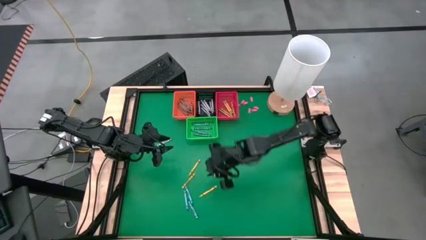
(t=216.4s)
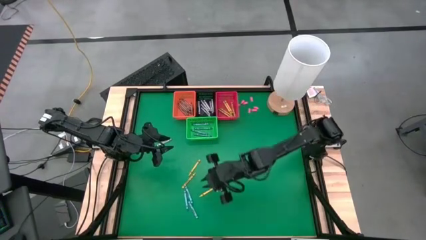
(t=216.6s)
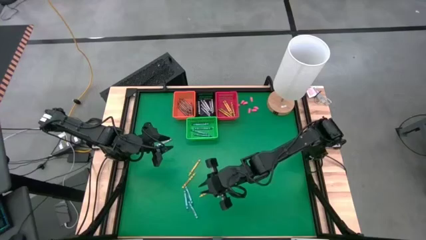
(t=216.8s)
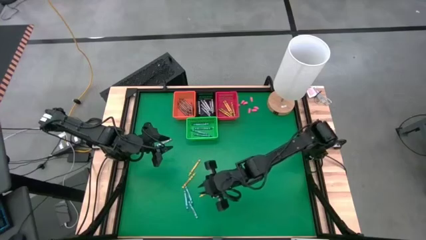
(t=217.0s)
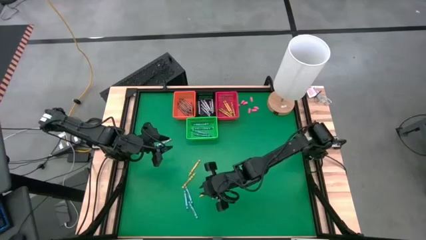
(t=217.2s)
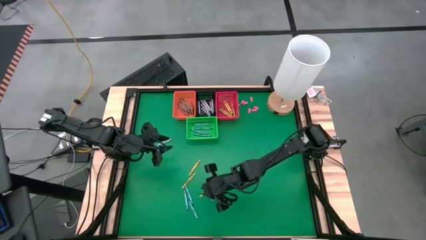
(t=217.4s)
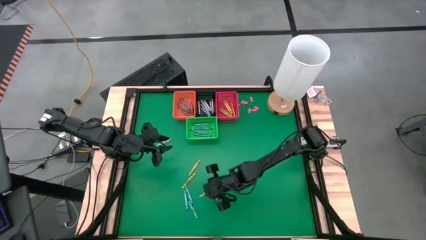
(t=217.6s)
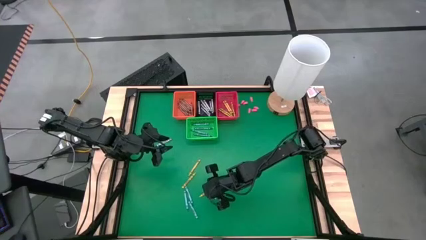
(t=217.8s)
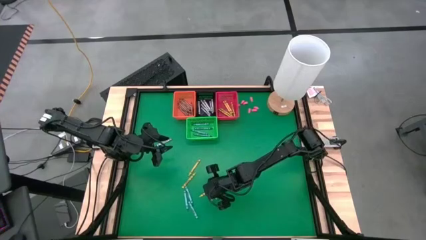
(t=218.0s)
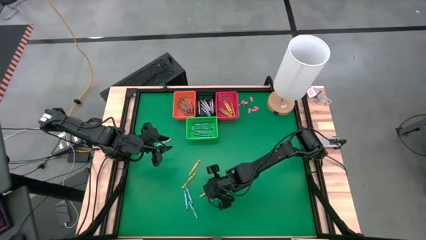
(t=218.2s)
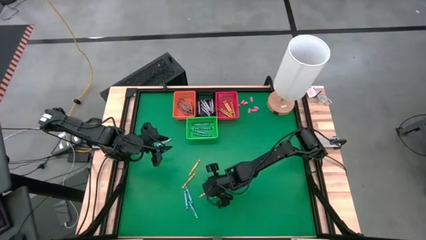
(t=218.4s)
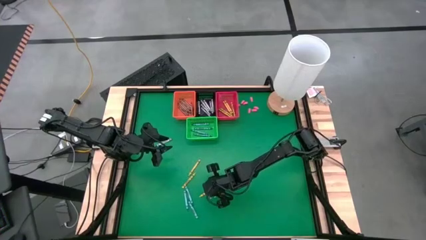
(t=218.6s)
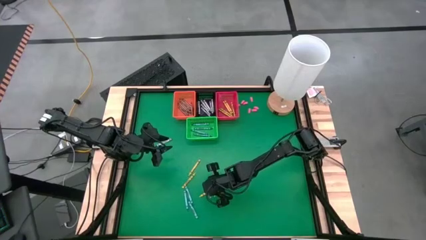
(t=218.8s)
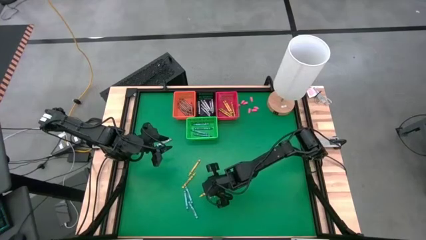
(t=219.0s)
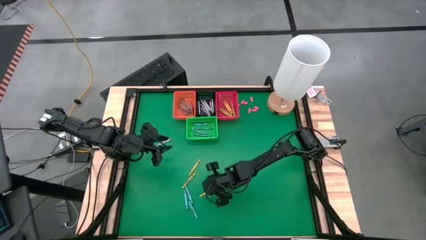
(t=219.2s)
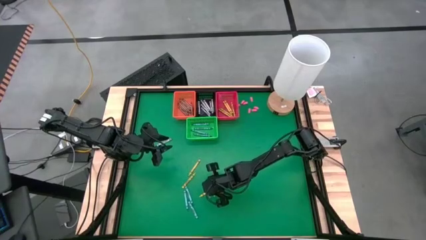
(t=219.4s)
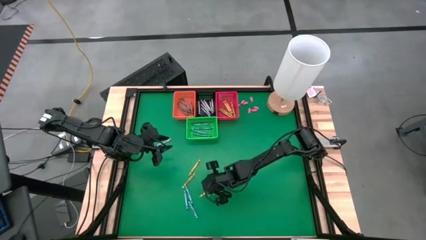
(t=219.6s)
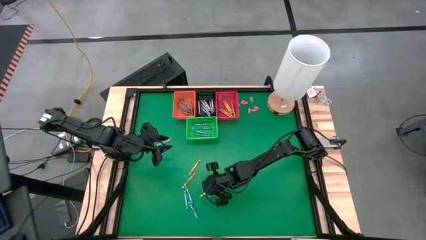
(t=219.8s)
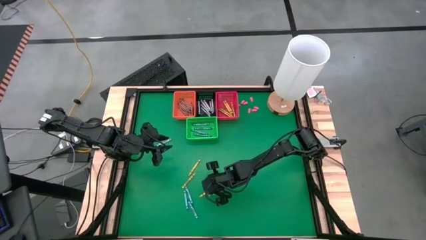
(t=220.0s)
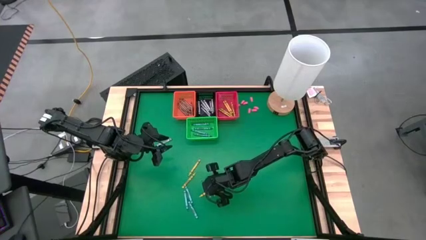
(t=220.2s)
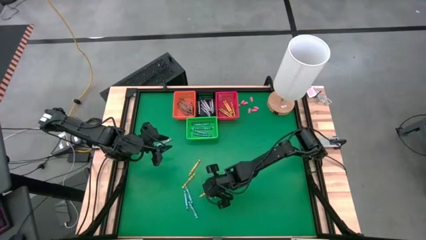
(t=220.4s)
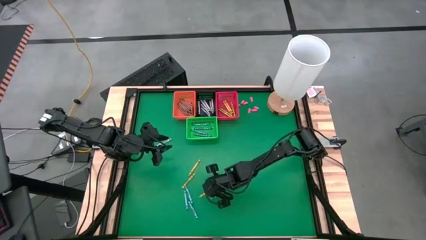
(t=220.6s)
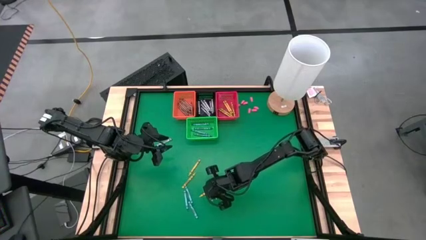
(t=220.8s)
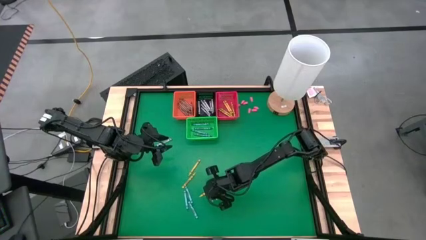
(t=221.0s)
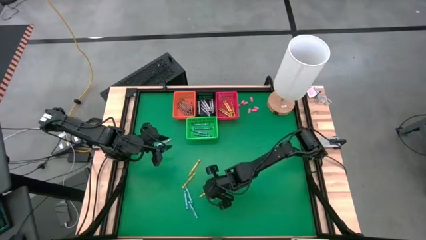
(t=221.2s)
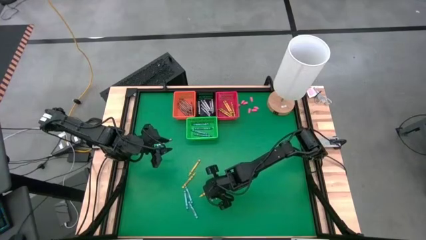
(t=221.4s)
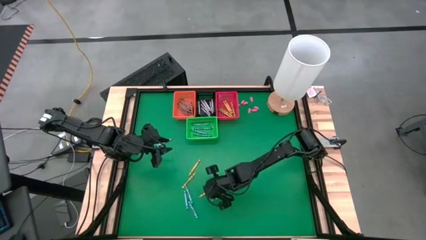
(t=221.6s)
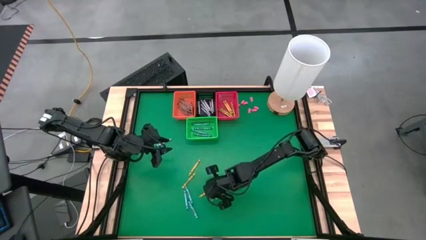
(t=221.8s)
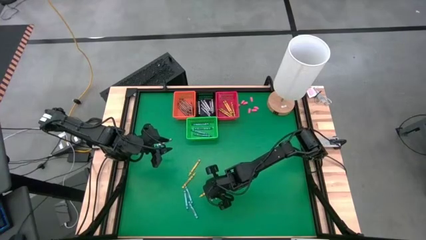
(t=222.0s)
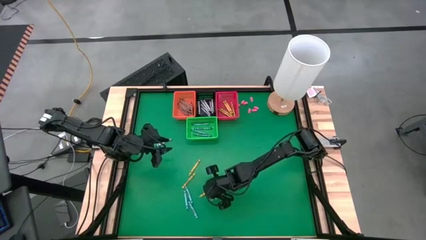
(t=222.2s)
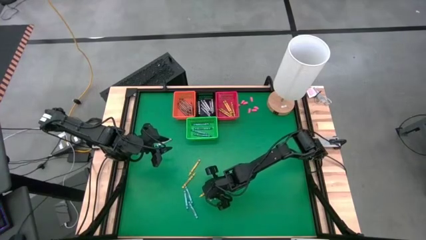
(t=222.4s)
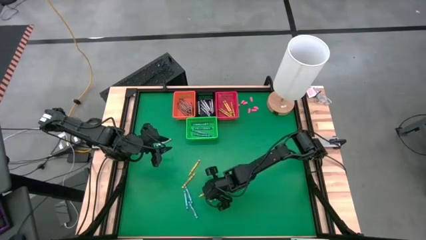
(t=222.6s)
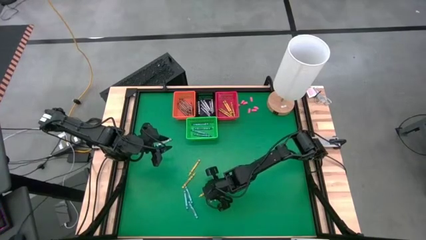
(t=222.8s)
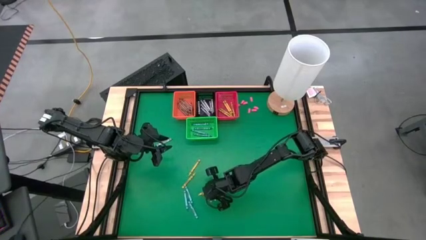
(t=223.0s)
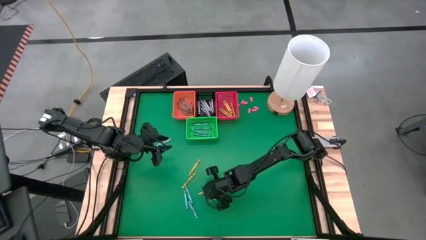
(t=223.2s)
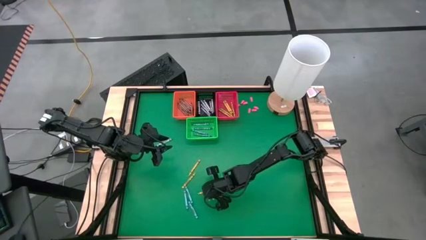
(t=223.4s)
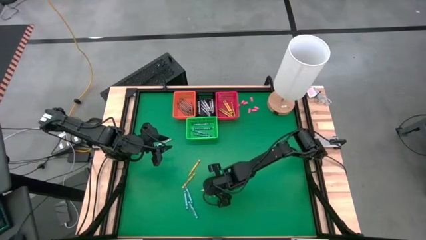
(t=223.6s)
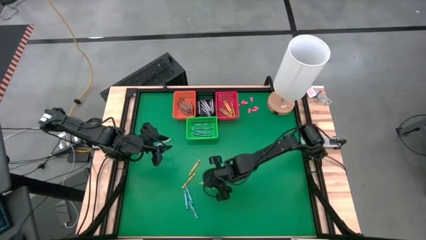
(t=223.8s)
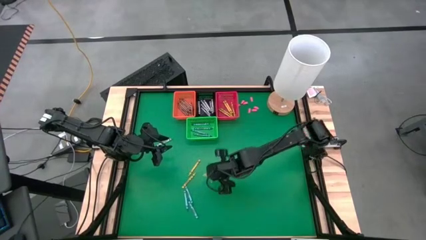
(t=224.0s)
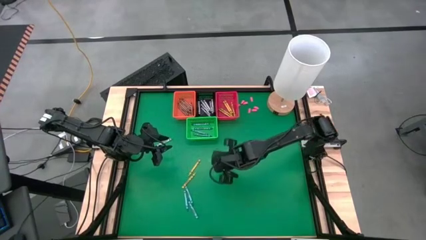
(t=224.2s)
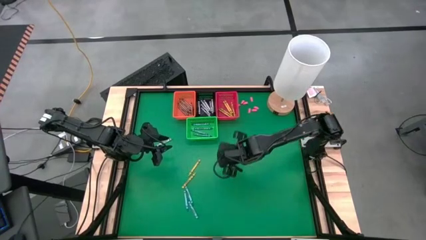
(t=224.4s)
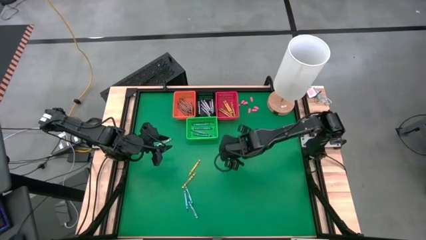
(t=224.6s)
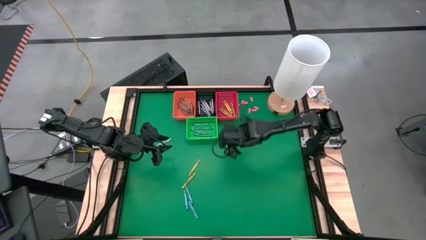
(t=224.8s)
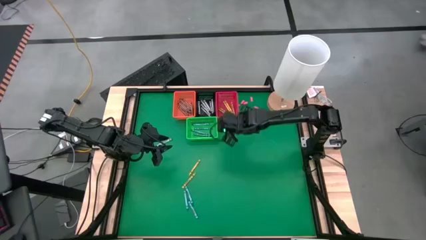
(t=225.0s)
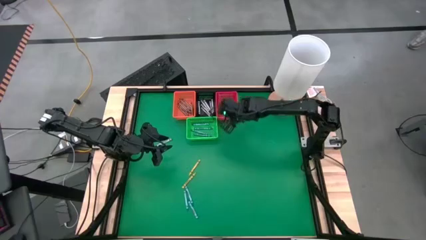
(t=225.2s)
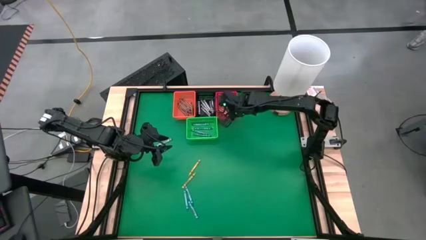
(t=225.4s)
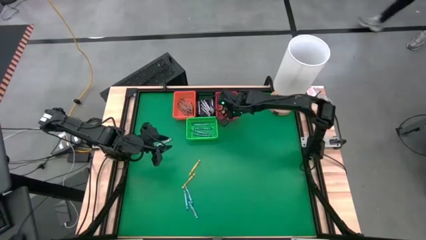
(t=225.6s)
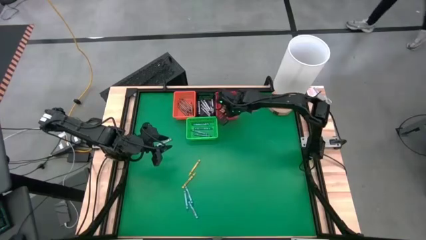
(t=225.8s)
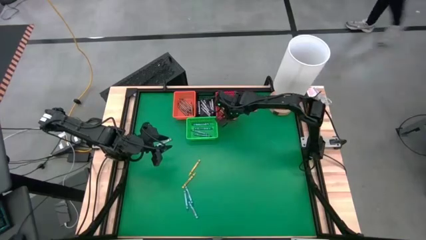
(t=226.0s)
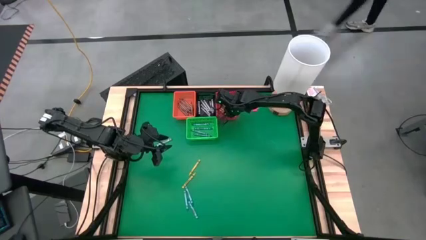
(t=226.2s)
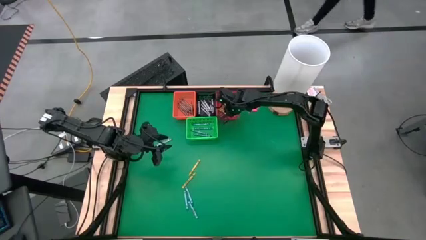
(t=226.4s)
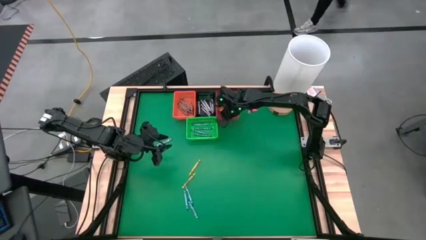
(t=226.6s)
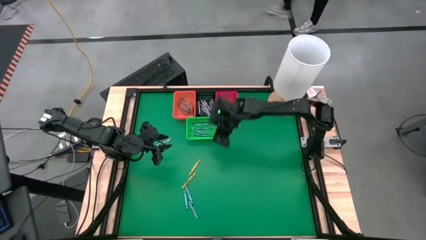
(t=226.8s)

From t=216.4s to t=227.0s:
Task: Sort crayons
Put a yellow crayon in the red basket

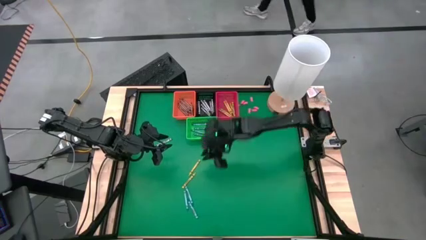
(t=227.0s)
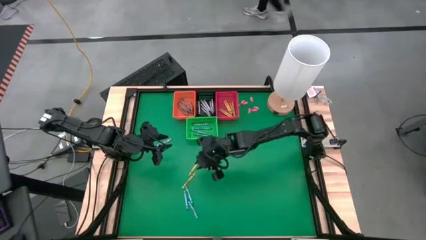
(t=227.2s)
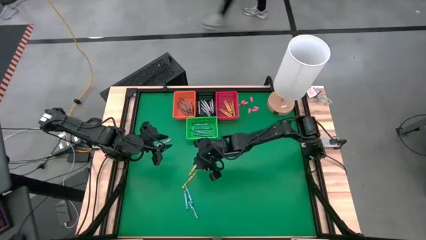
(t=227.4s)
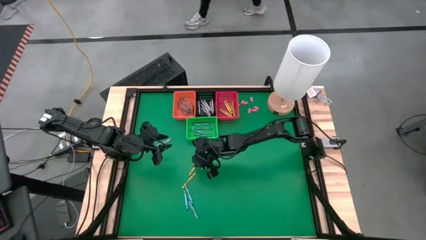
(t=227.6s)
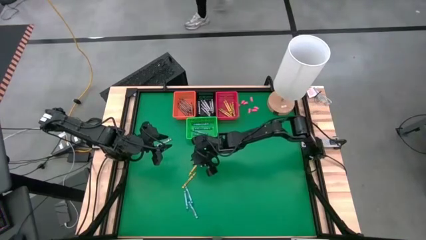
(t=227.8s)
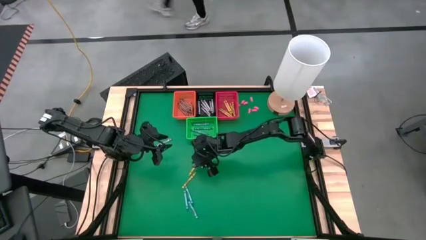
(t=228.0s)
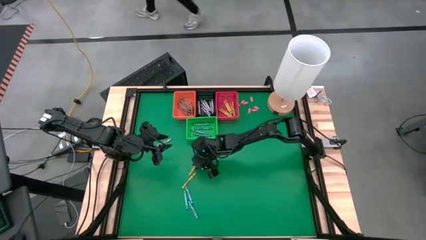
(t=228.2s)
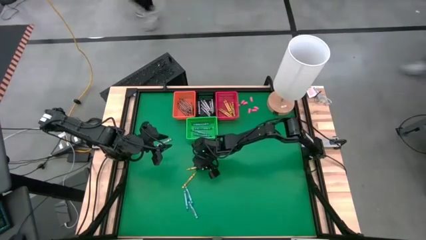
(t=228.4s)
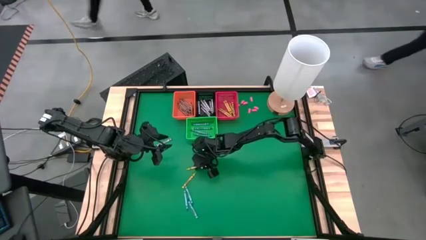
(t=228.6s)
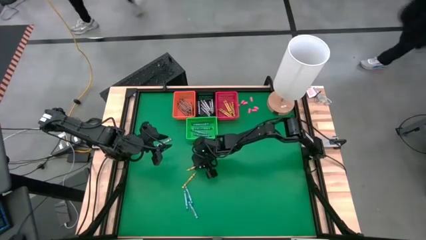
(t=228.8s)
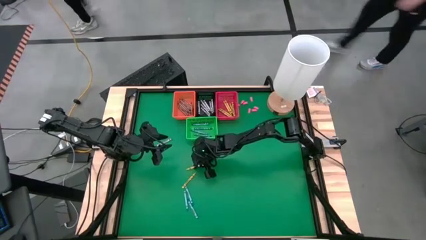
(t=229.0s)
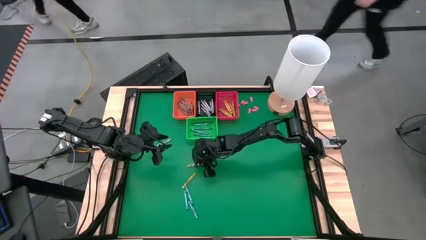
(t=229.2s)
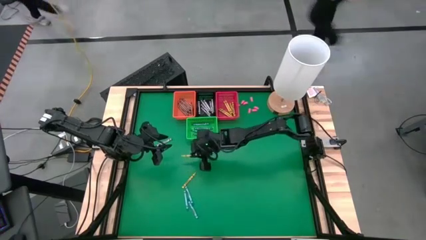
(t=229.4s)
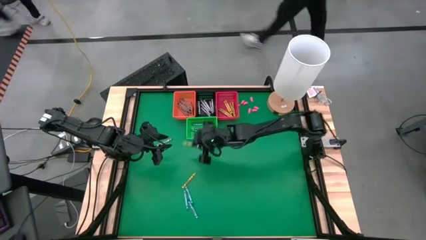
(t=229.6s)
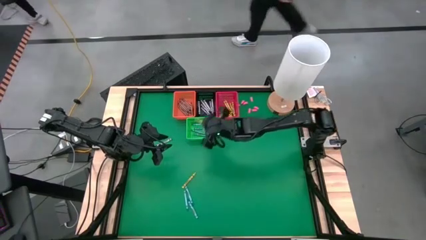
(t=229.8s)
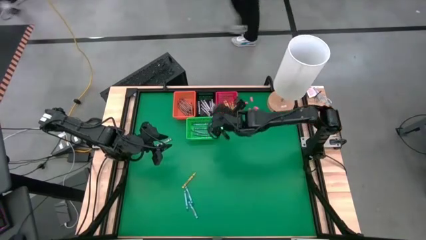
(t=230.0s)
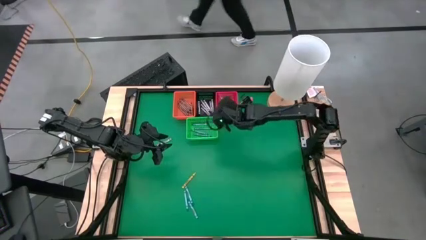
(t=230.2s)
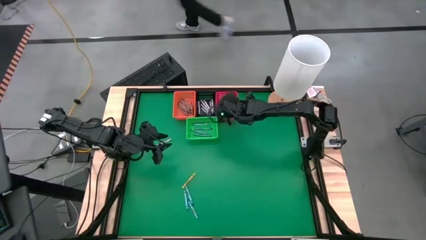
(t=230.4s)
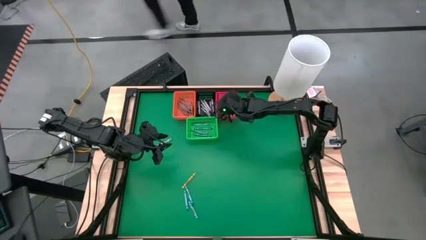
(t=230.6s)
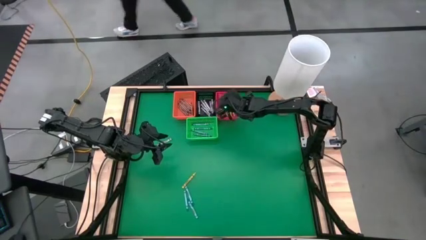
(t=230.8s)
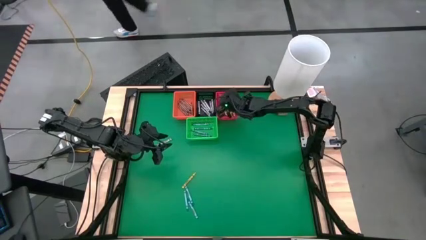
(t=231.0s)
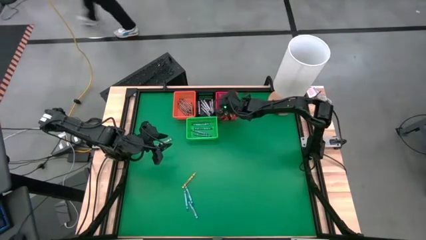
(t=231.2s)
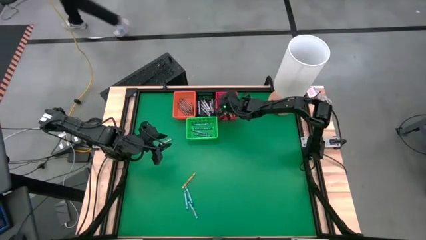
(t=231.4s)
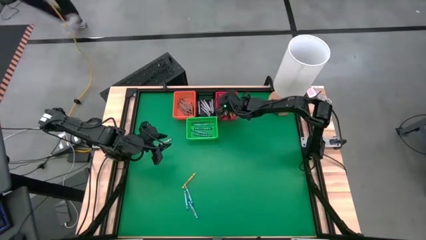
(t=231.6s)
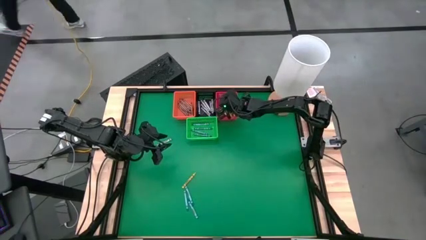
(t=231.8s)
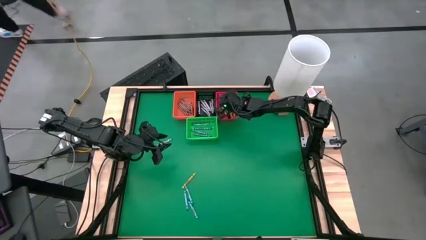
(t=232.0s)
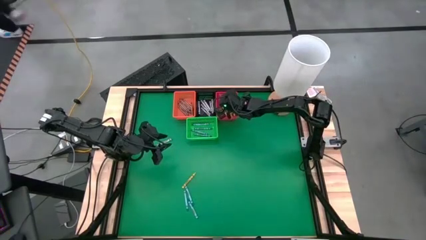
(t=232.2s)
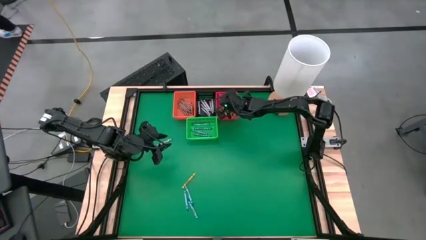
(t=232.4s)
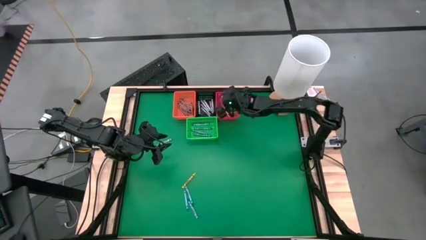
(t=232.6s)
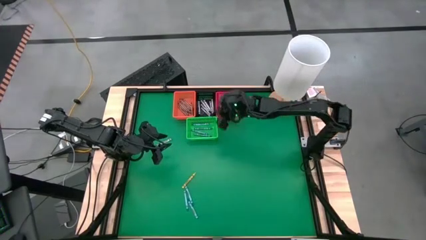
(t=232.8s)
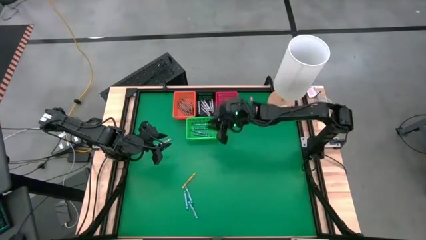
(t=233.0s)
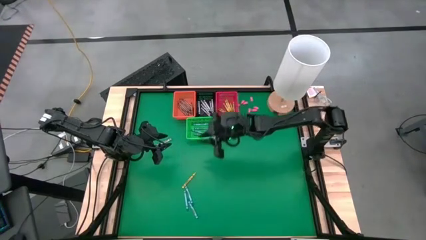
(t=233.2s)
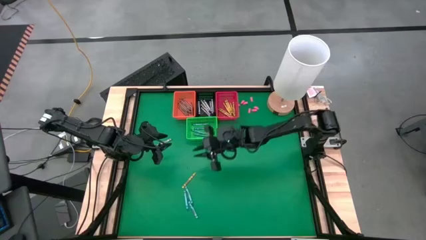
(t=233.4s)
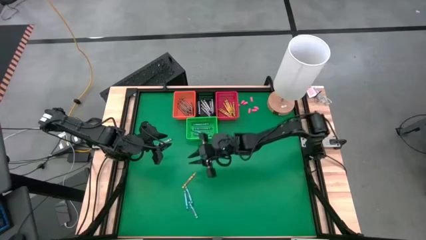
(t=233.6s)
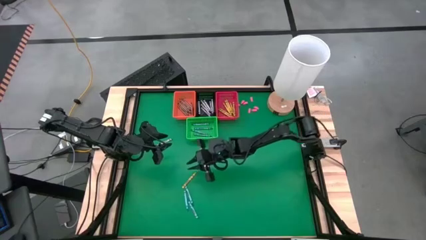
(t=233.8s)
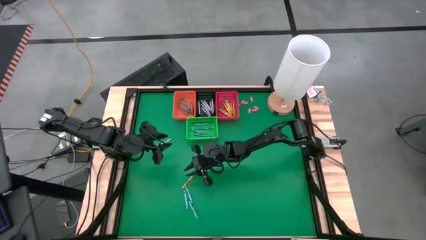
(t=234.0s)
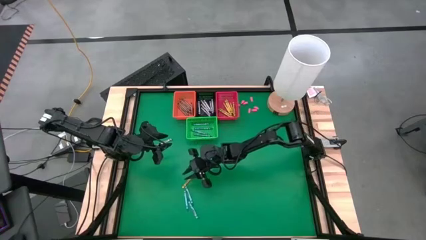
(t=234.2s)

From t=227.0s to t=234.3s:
Put a yellow crayon in the red basket
